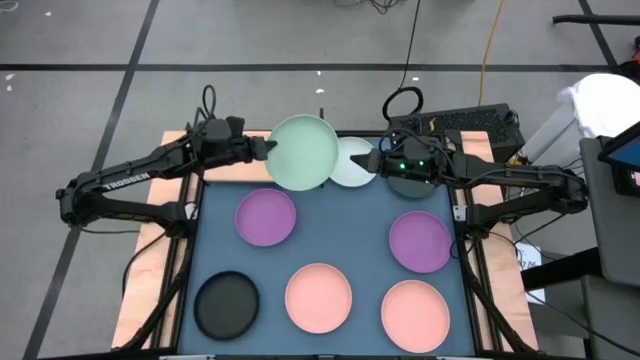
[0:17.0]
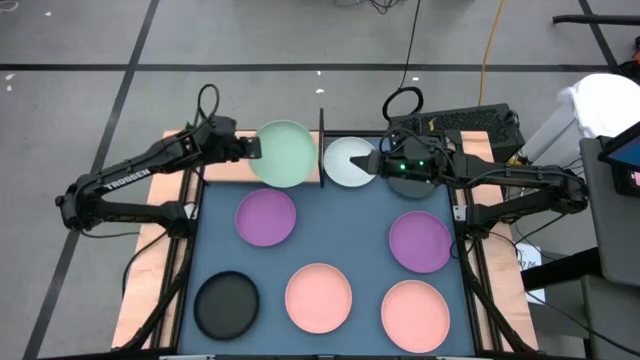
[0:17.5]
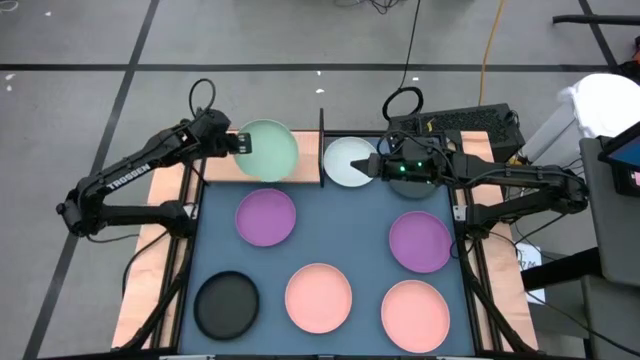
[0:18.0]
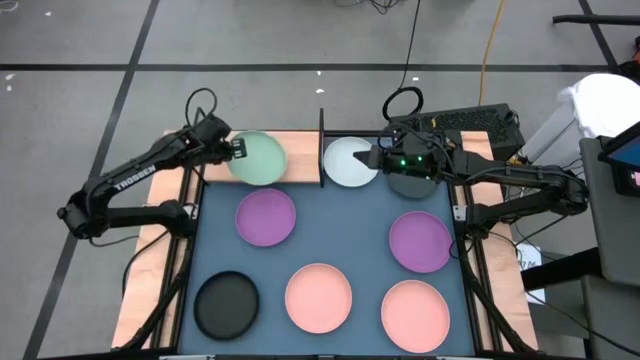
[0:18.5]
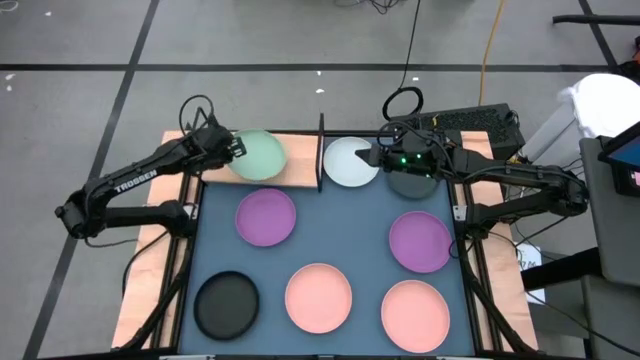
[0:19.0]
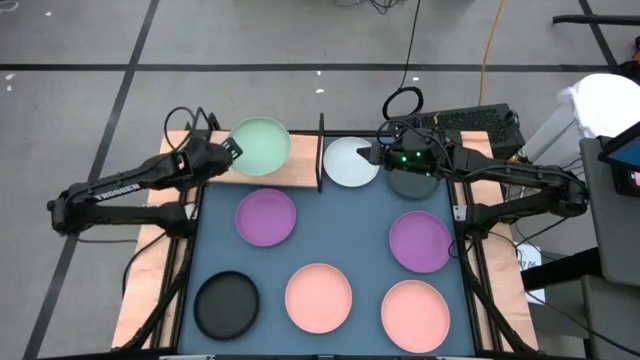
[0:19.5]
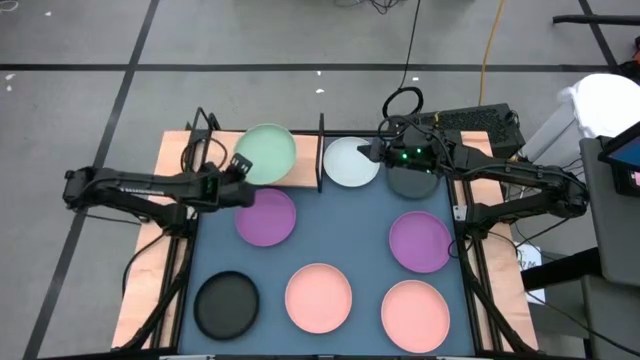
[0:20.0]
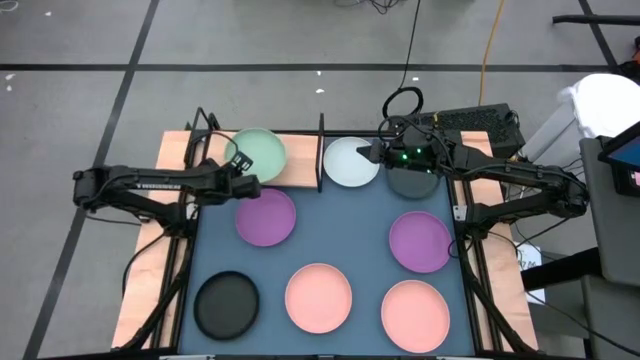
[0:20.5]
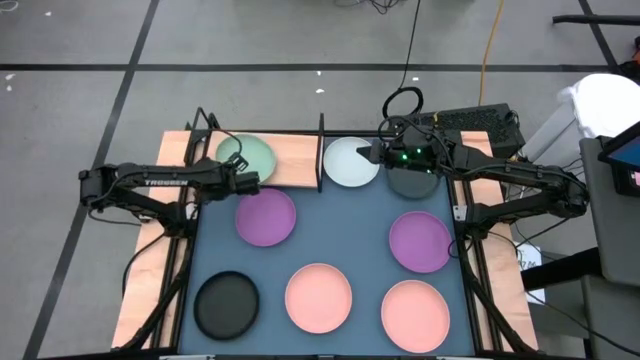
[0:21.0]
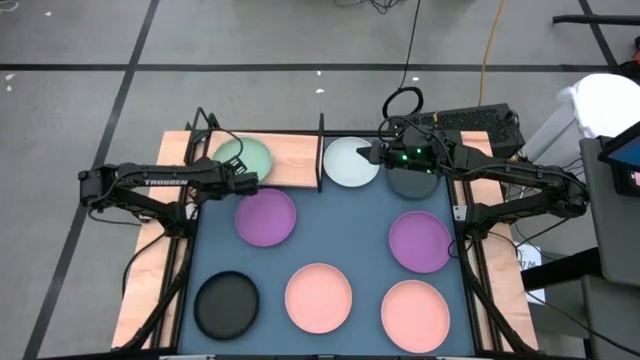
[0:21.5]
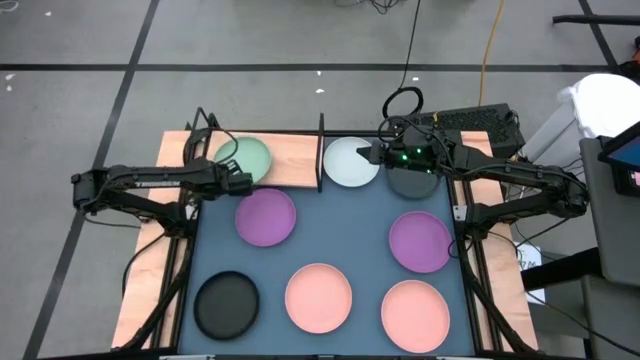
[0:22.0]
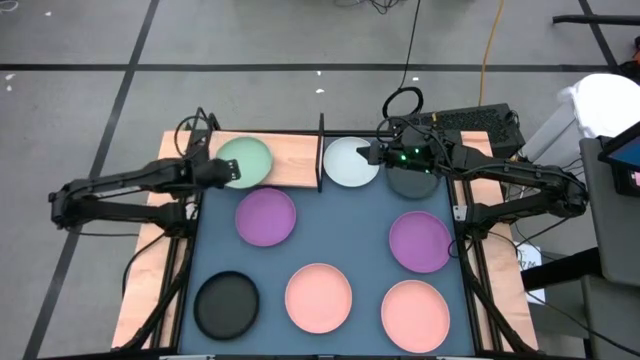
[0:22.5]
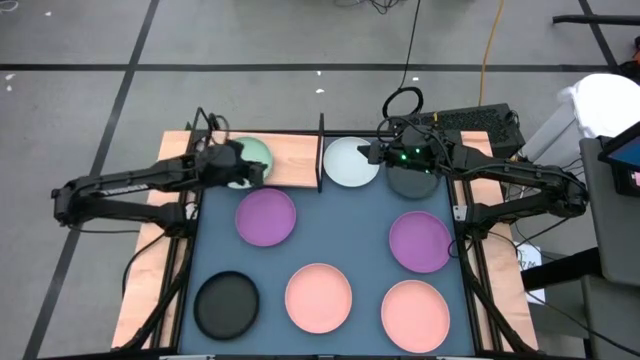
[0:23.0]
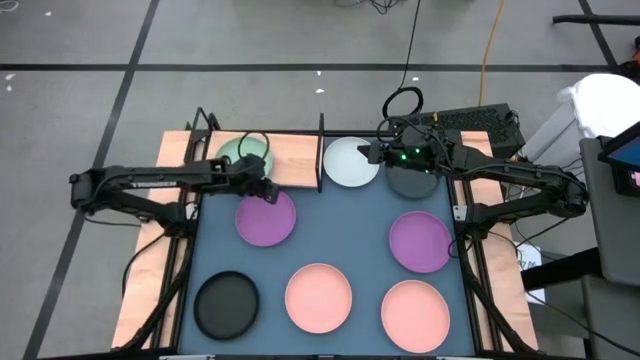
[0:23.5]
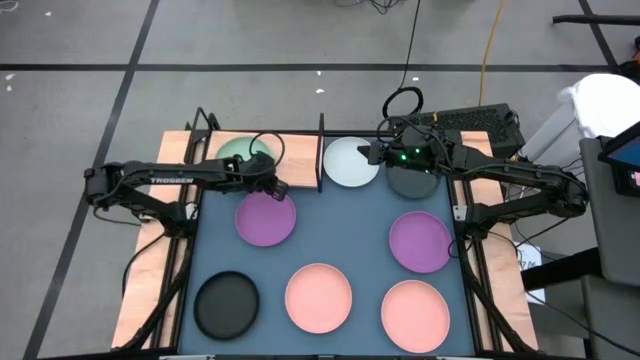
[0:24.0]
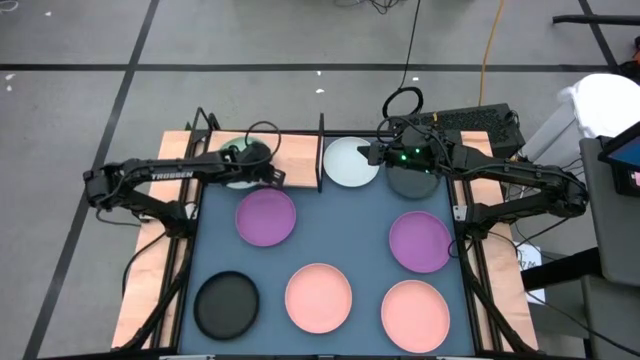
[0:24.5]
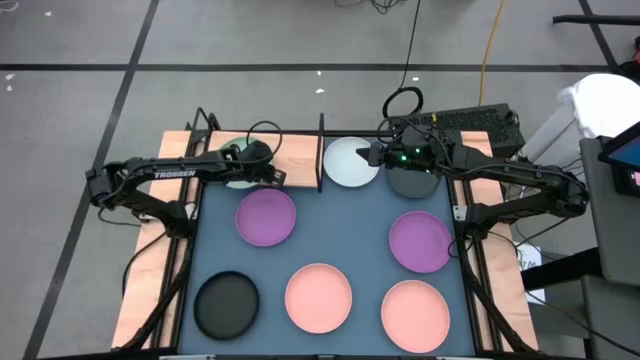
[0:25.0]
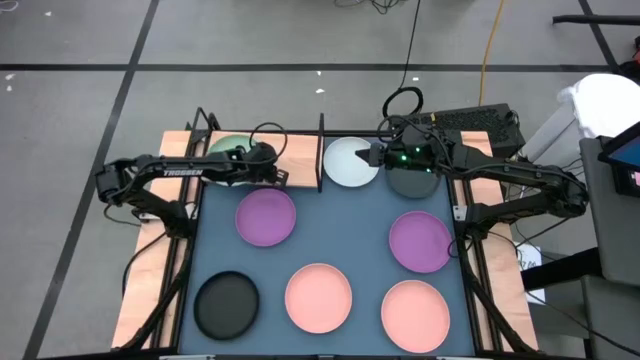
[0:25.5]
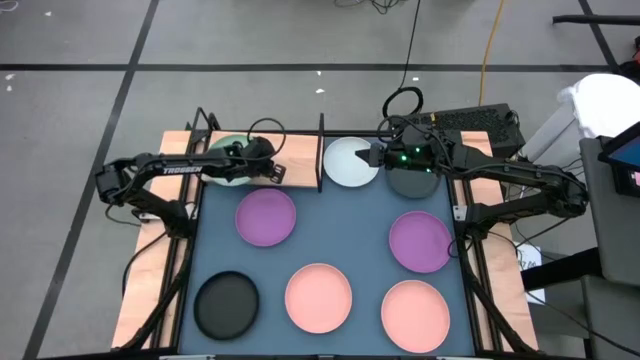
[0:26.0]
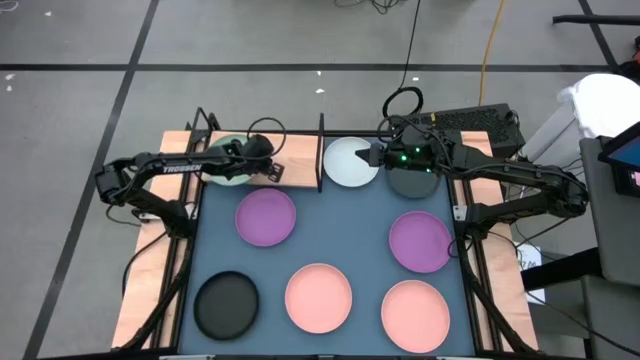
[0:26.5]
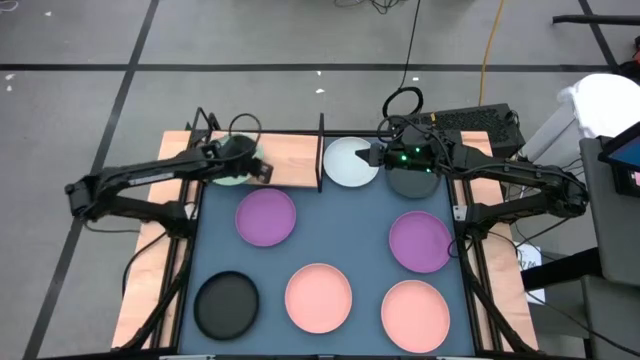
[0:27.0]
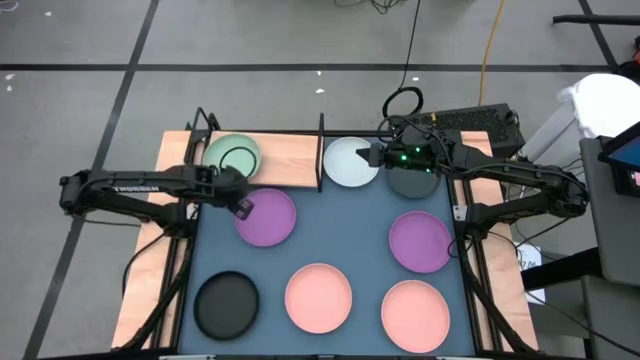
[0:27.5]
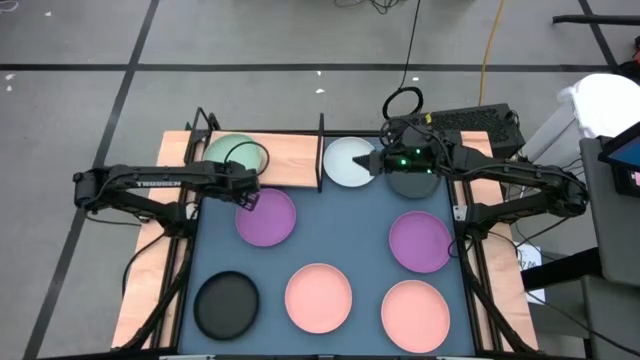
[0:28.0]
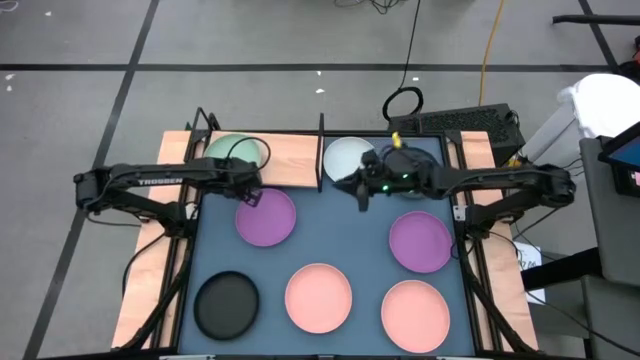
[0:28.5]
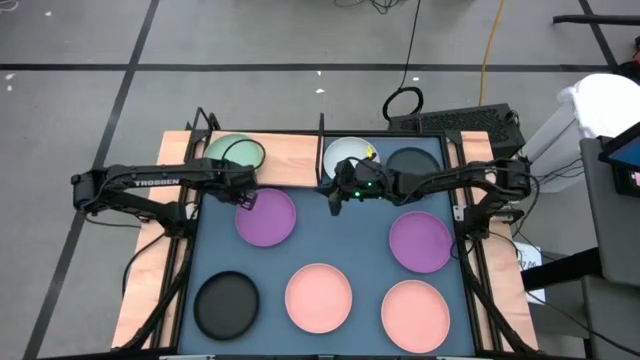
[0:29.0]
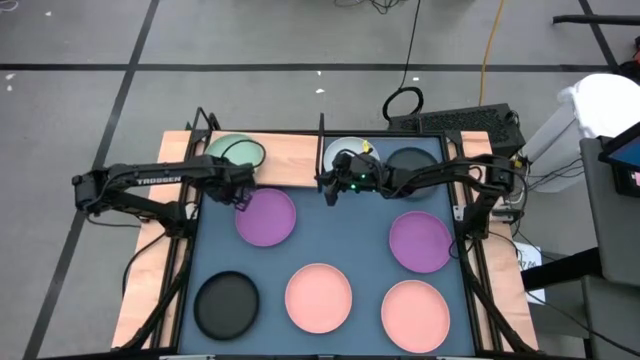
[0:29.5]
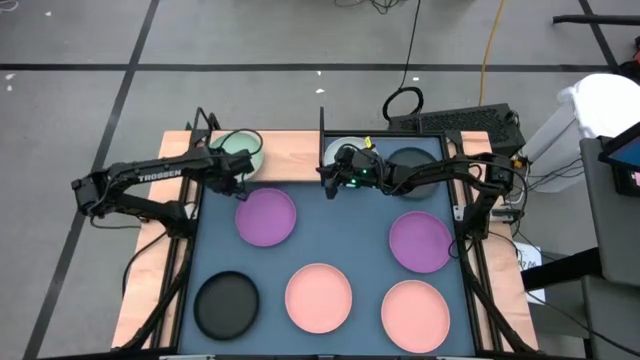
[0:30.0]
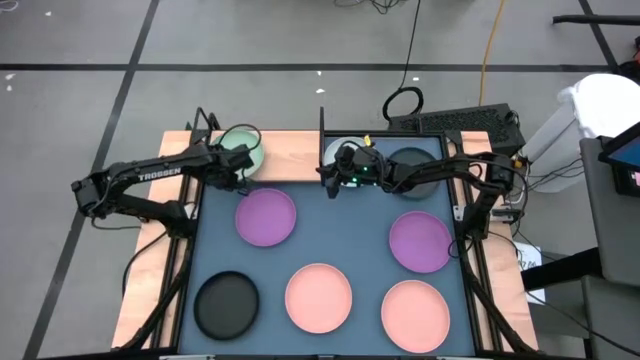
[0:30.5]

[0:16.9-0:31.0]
Task: Place and stack plates onto a shelf
Put the light green plate on the shelf
